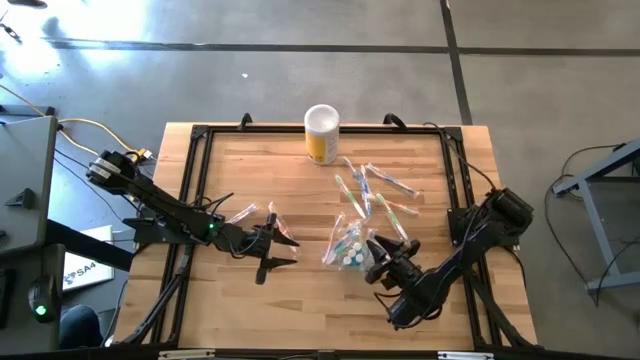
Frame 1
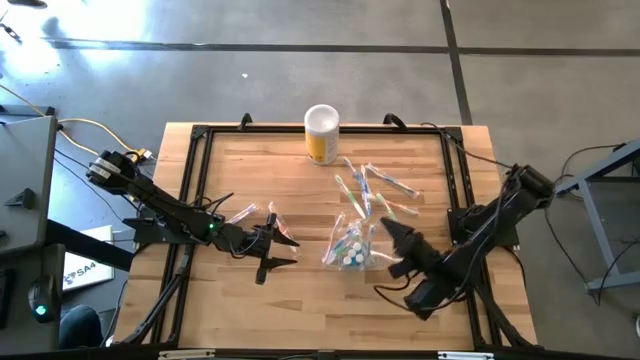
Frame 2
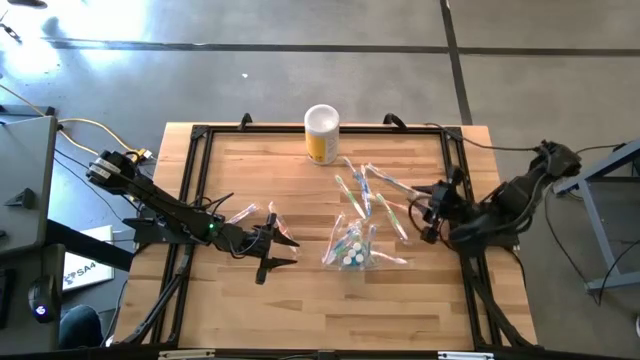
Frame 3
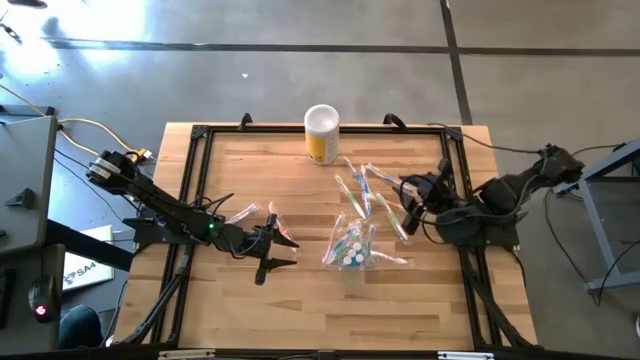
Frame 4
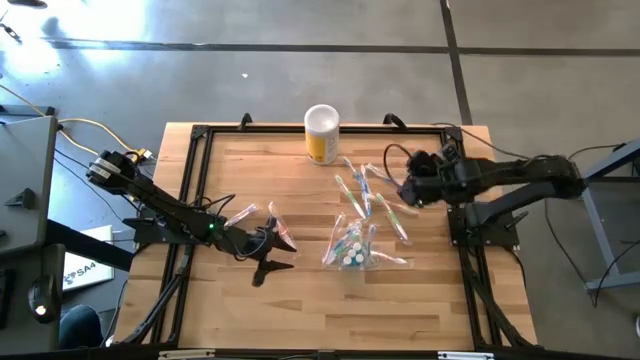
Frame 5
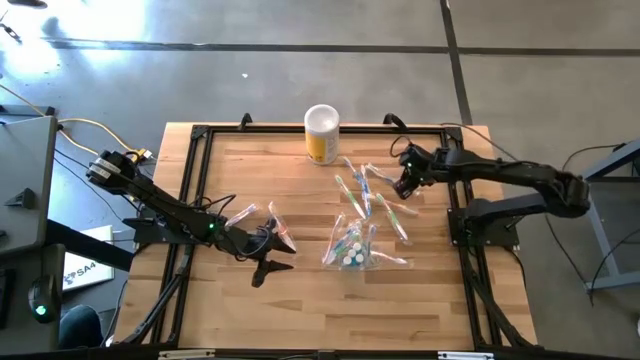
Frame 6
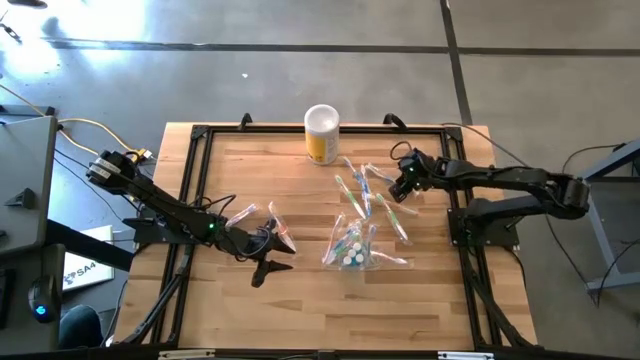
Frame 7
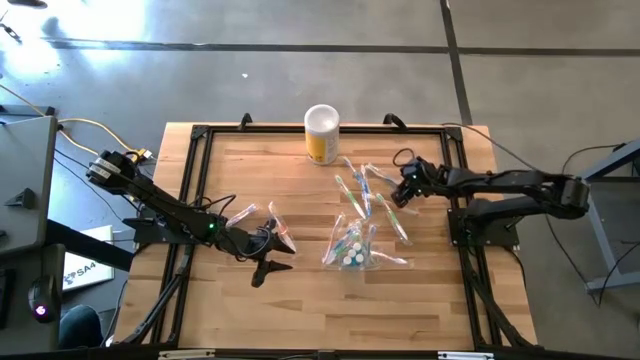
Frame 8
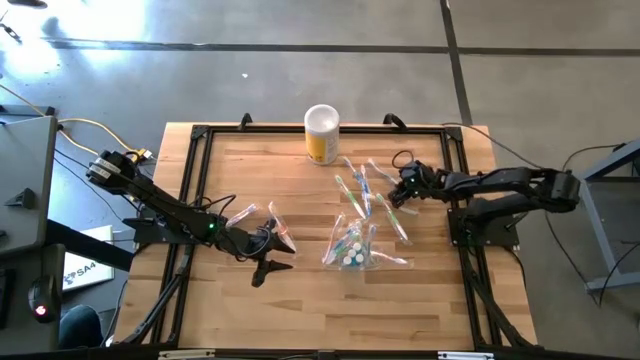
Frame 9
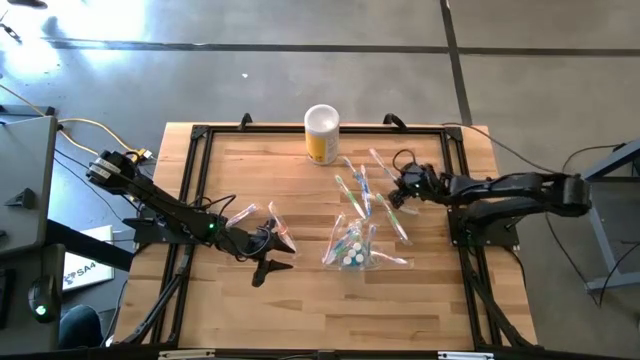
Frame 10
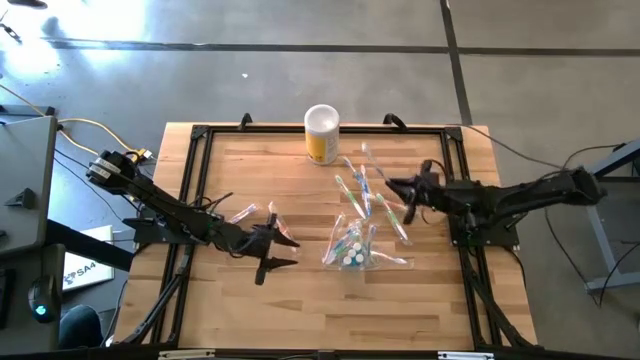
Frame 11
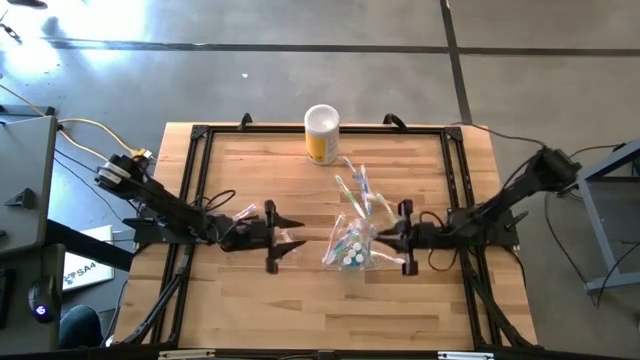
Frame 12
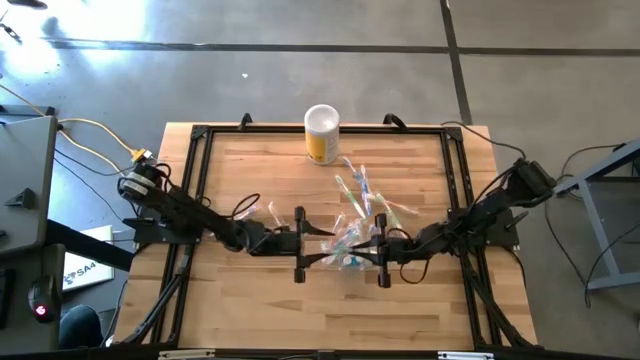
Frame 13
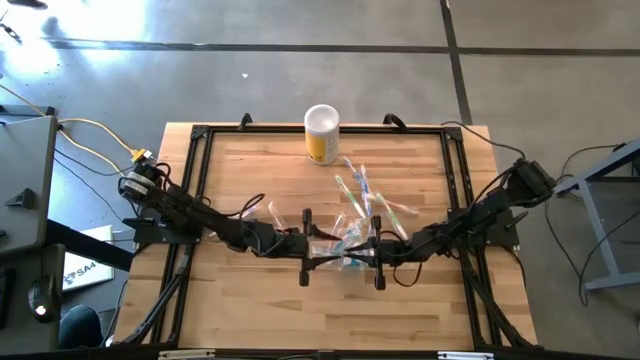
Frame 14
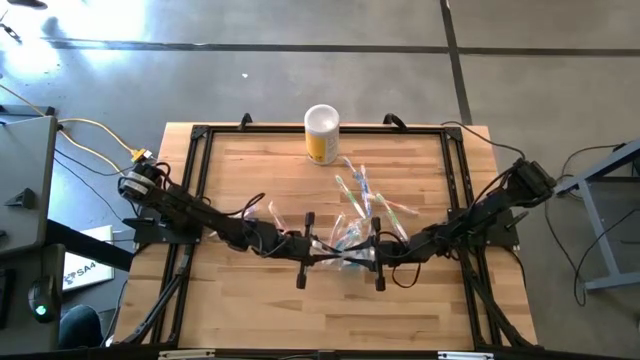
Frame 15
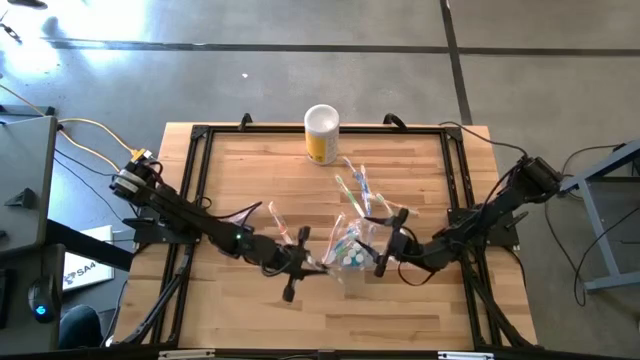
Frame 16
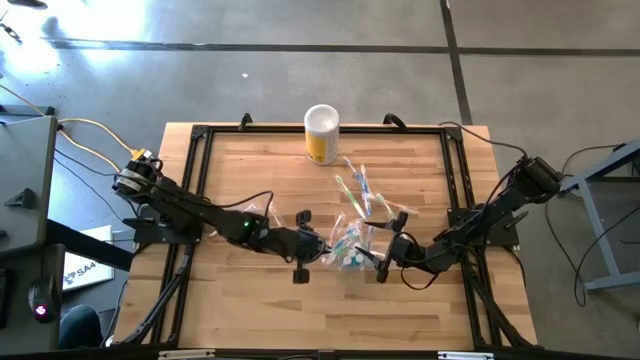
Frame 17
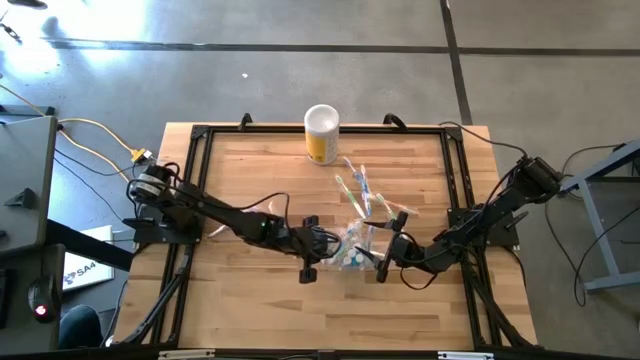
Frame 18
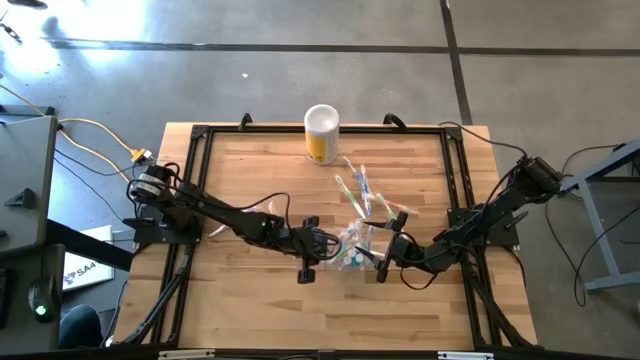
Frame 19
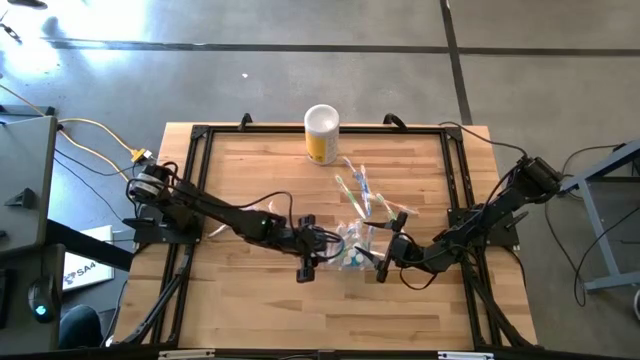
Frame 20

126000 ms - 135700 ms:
Task: Pick & Place toothbrushing station
Put the blue toothbrush in the transparent organizer

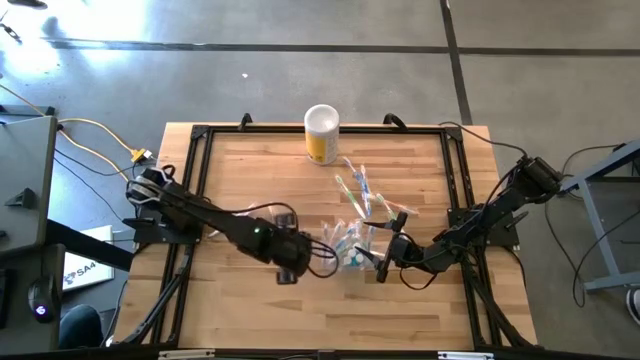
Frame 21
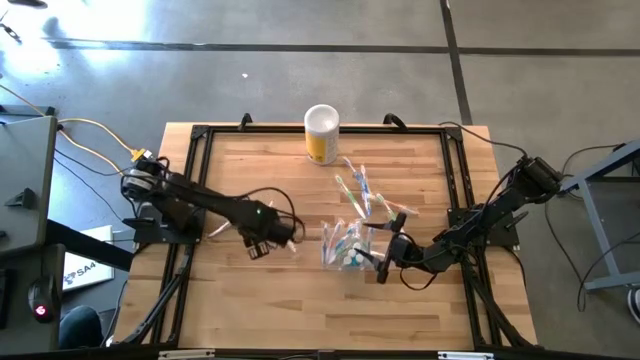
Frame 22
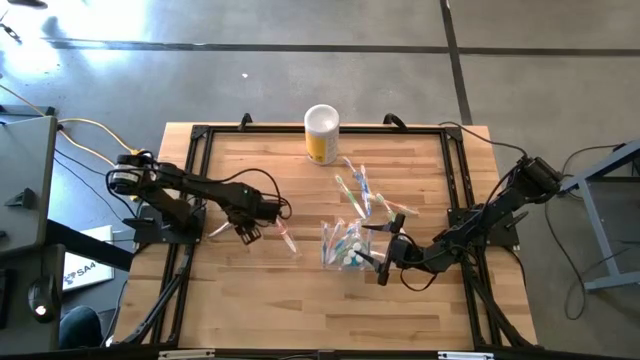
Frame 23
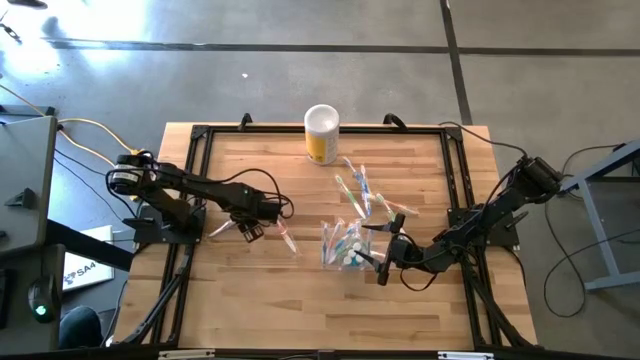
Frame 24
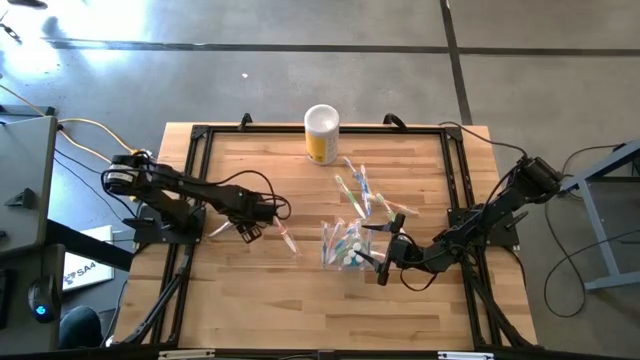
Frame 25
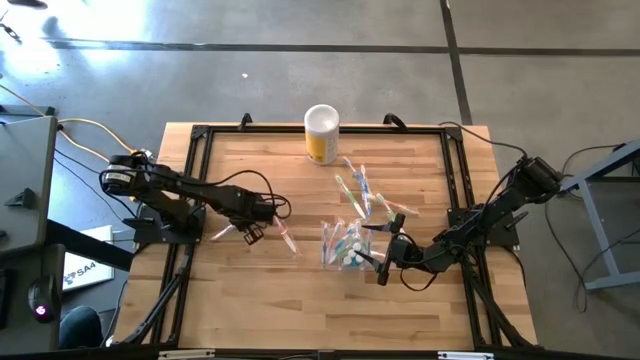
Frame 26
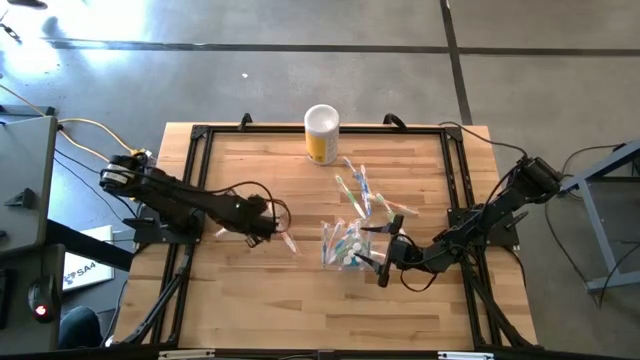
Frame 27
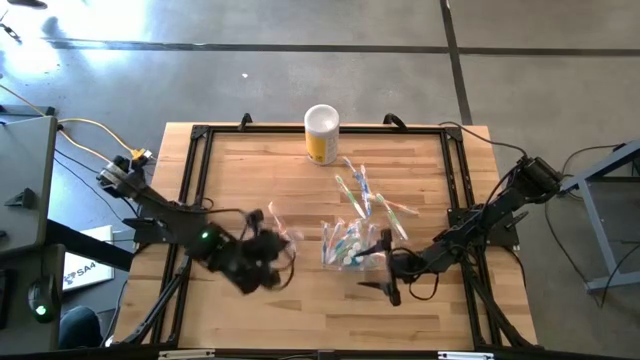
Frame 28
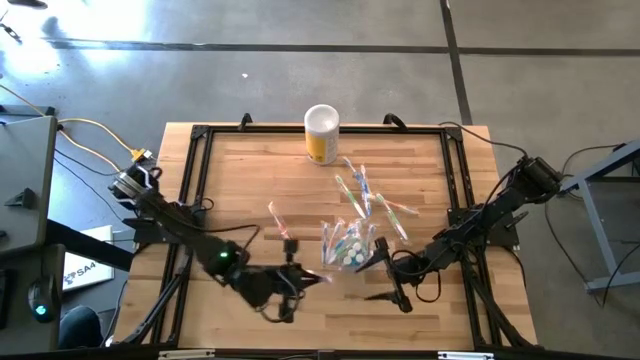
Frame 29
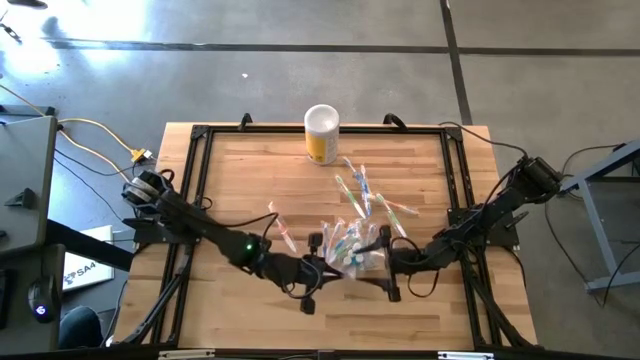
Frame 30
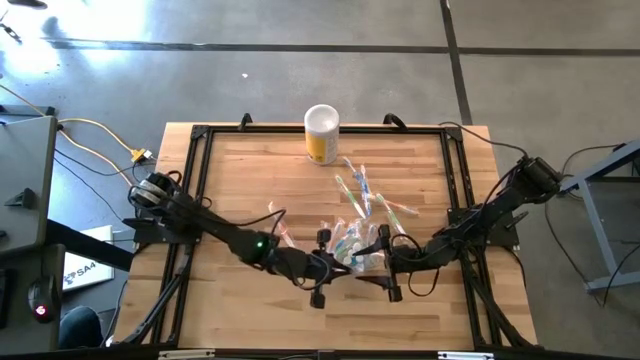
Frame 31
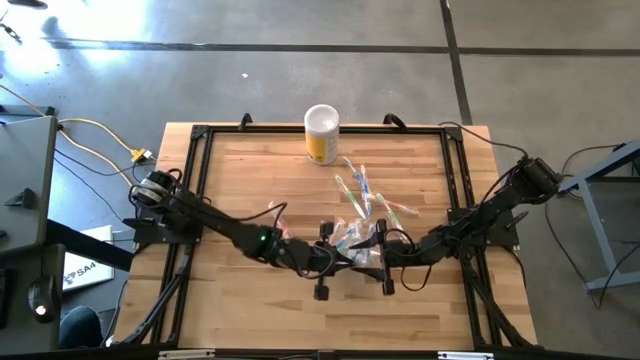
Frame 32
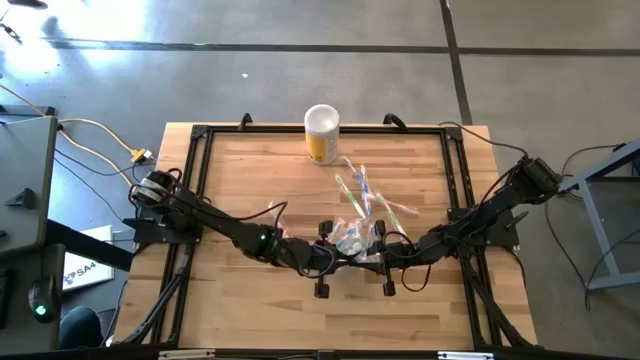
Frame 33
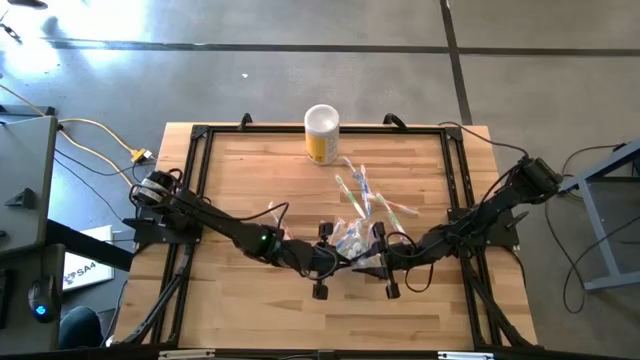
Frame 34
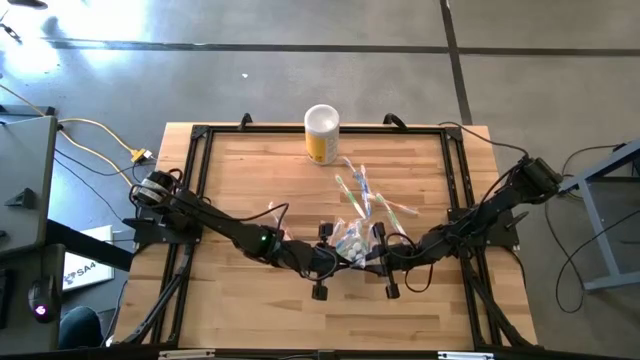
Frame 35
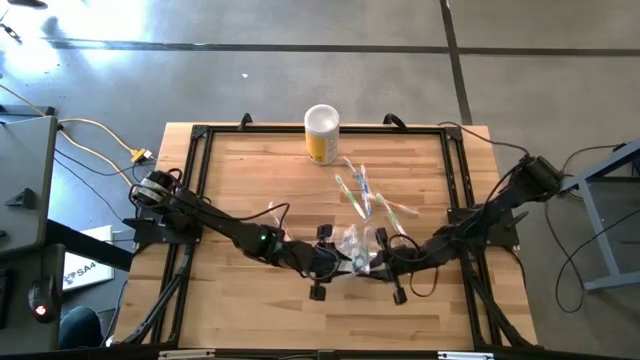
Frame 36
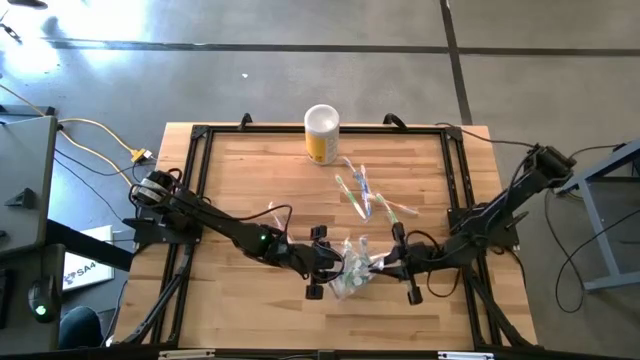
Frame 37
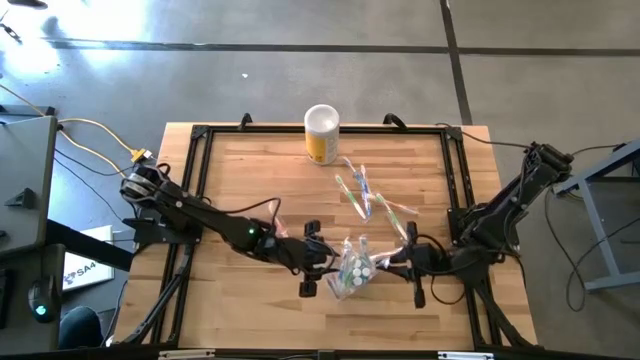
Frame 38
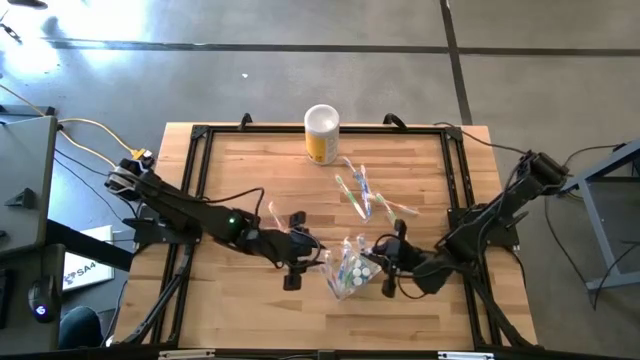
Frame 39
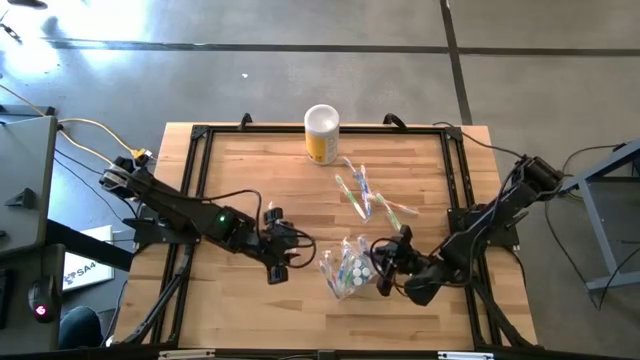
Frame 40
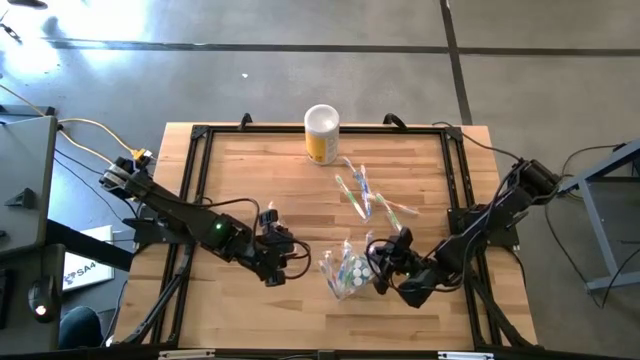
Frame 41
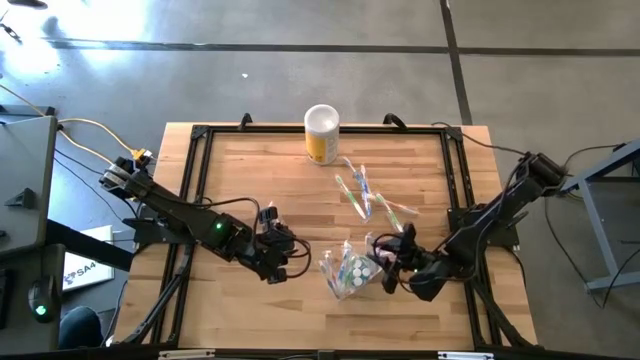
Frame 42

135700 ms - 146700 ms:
Put the purple toothbrush in the transparent organizer
